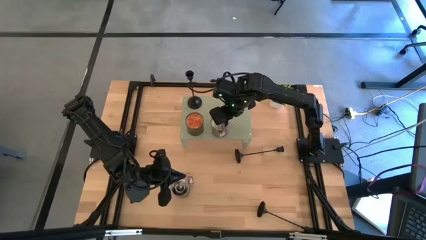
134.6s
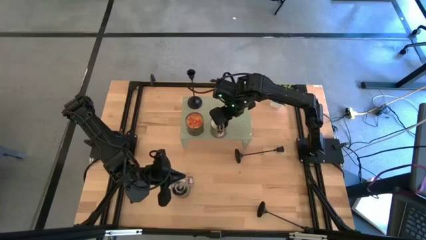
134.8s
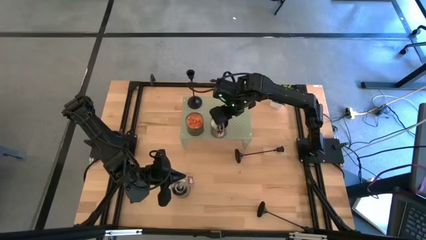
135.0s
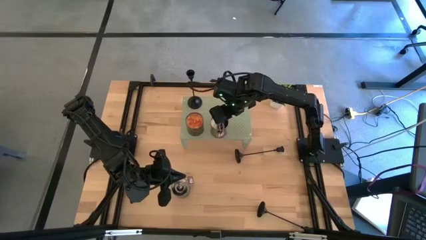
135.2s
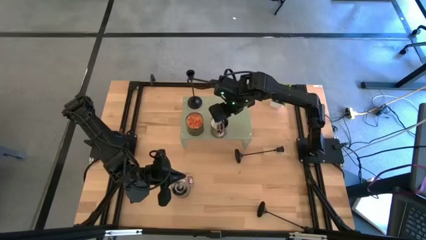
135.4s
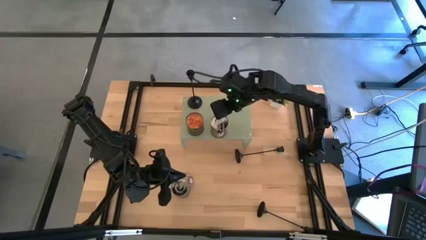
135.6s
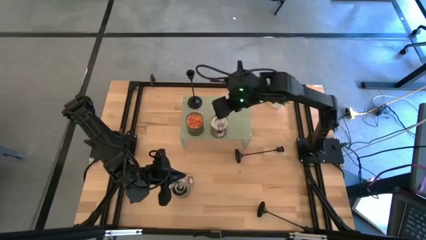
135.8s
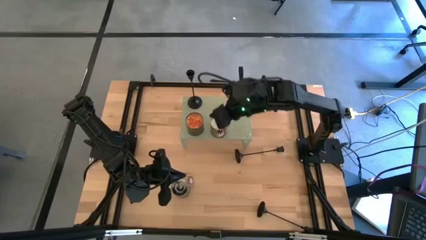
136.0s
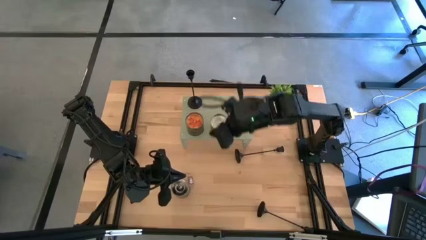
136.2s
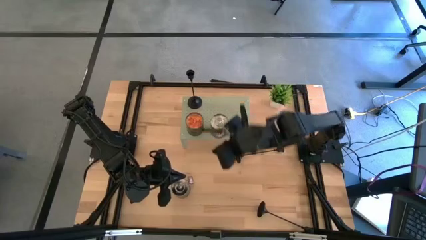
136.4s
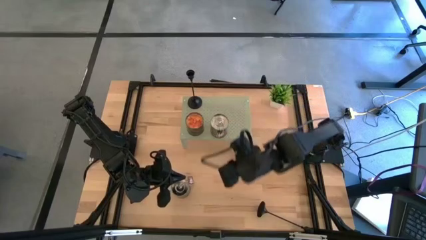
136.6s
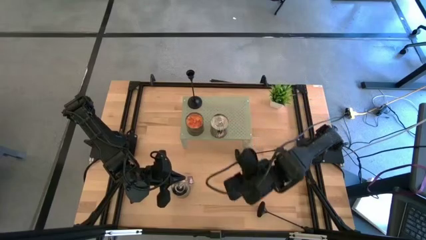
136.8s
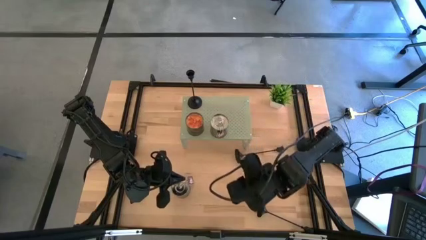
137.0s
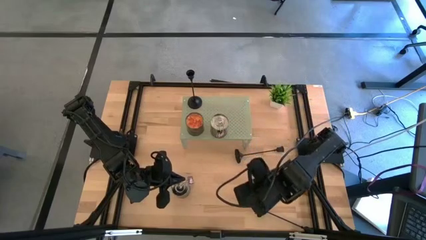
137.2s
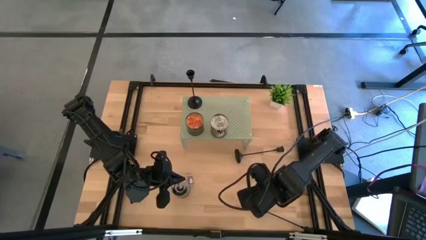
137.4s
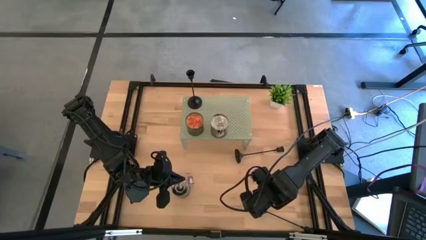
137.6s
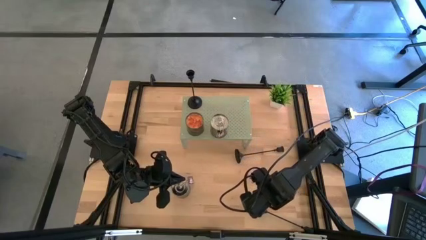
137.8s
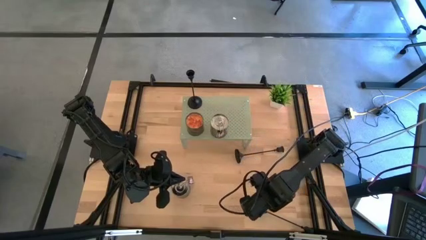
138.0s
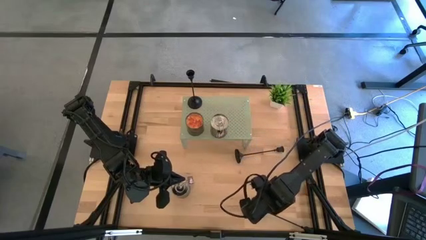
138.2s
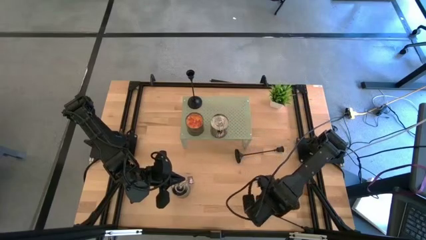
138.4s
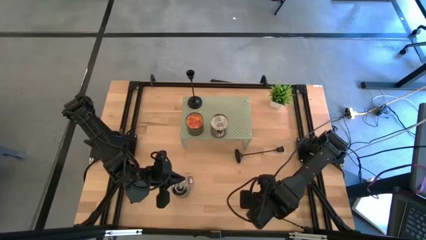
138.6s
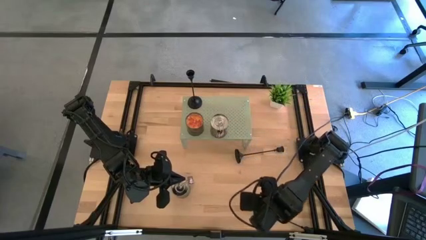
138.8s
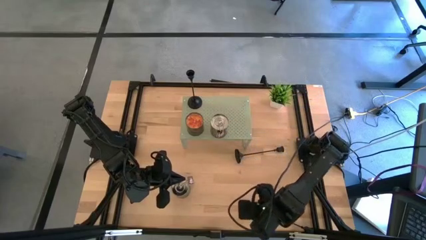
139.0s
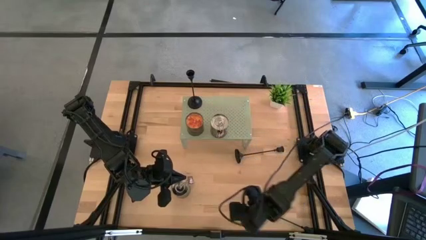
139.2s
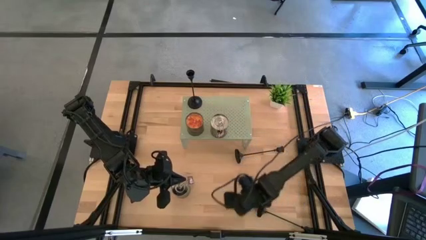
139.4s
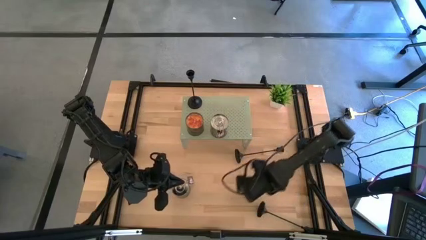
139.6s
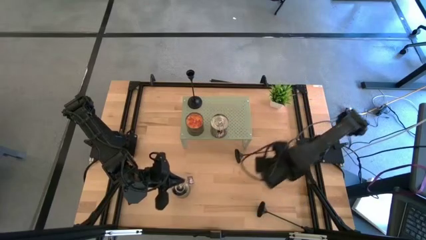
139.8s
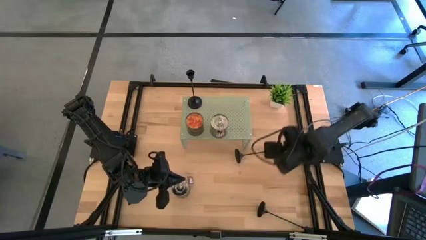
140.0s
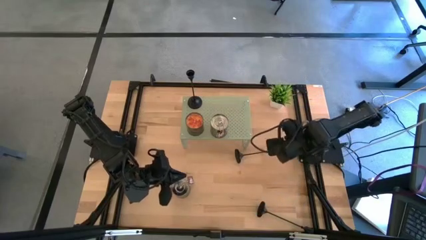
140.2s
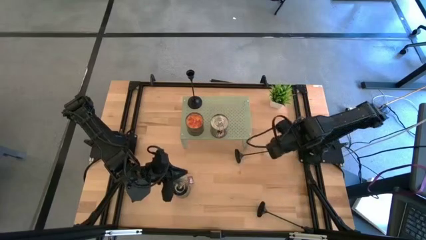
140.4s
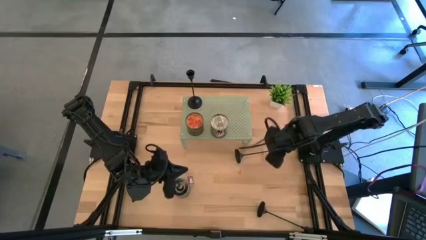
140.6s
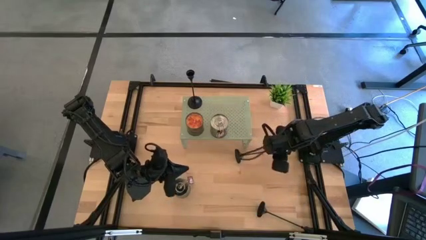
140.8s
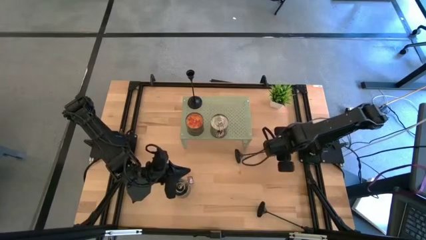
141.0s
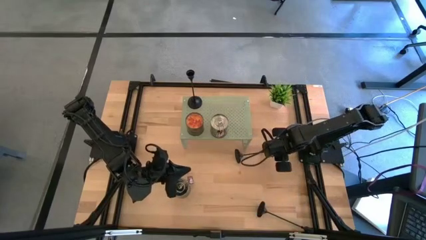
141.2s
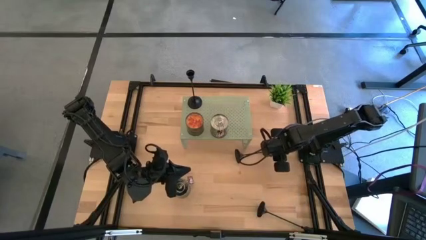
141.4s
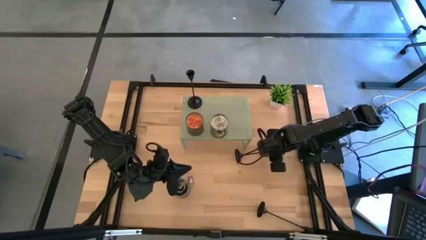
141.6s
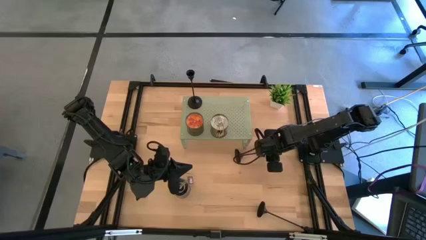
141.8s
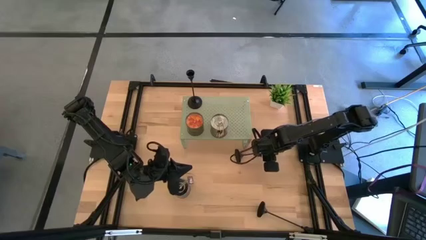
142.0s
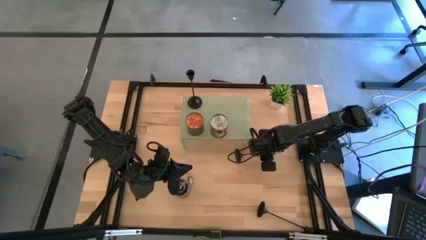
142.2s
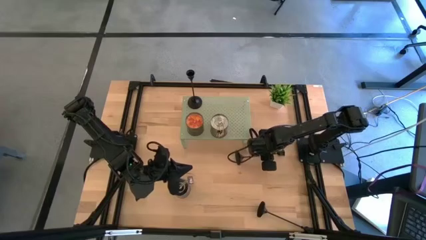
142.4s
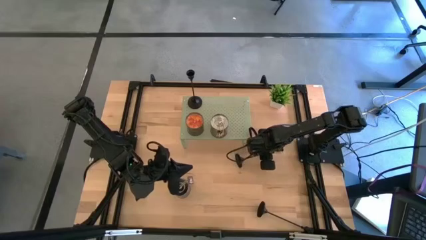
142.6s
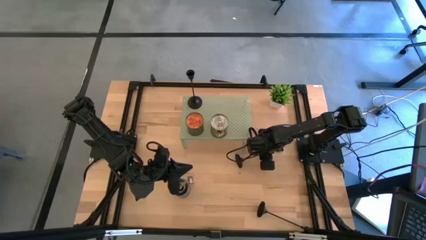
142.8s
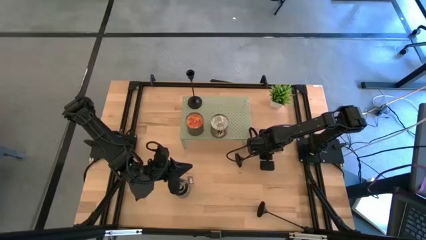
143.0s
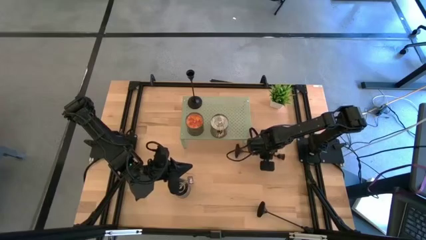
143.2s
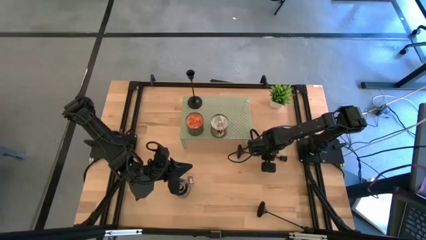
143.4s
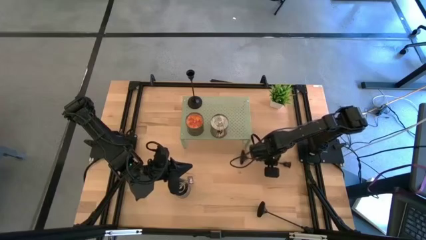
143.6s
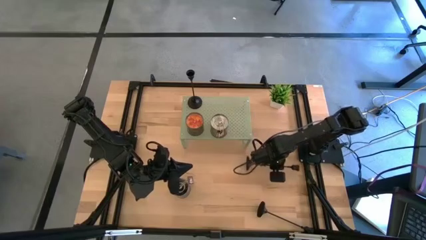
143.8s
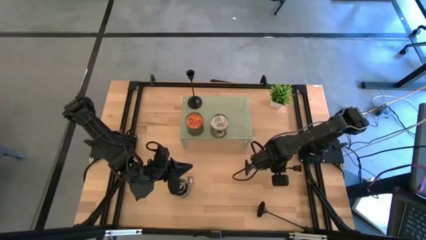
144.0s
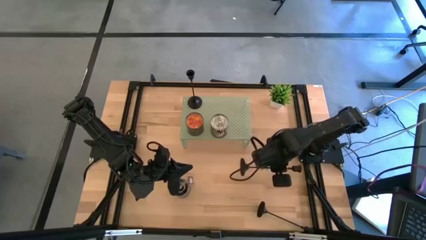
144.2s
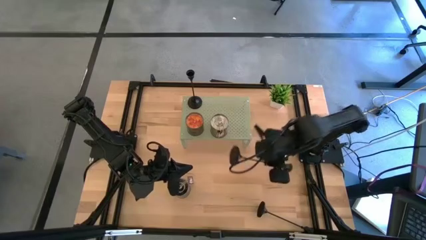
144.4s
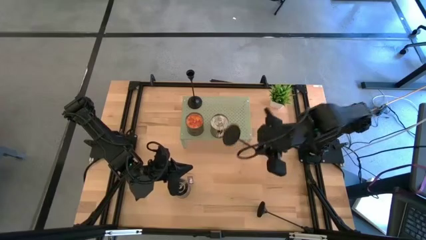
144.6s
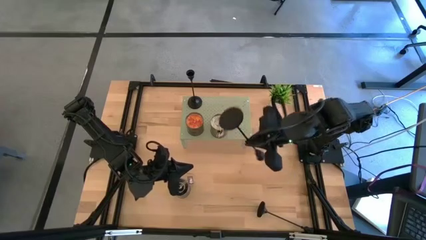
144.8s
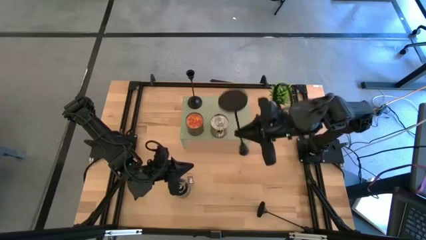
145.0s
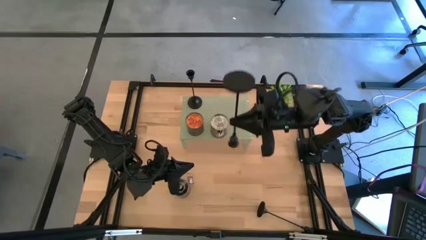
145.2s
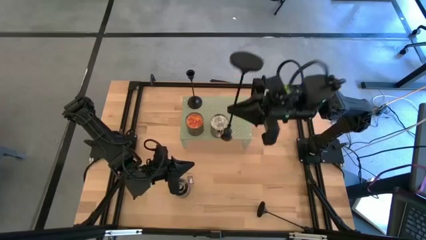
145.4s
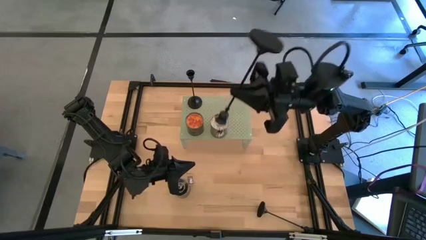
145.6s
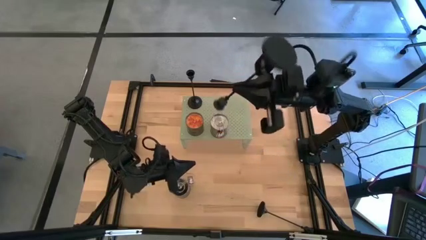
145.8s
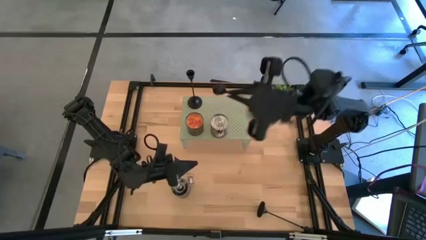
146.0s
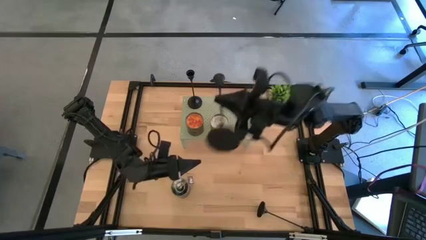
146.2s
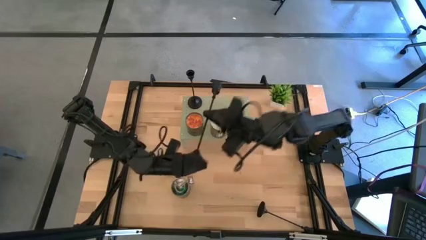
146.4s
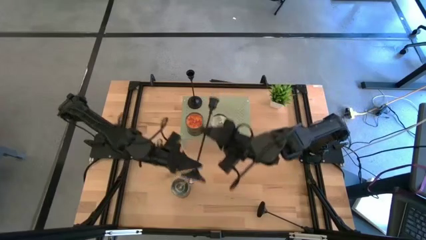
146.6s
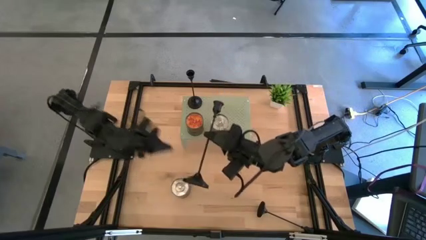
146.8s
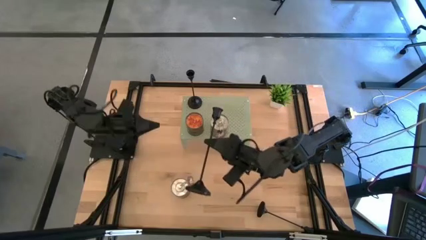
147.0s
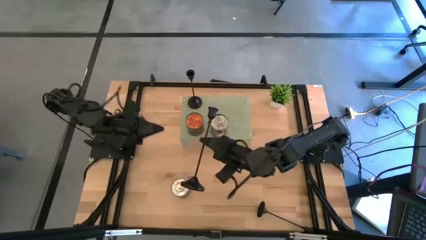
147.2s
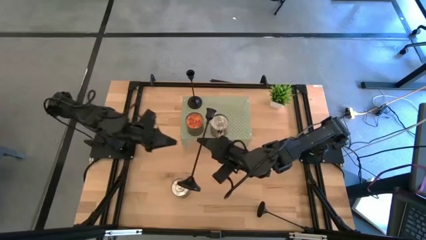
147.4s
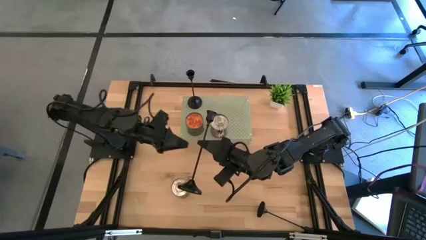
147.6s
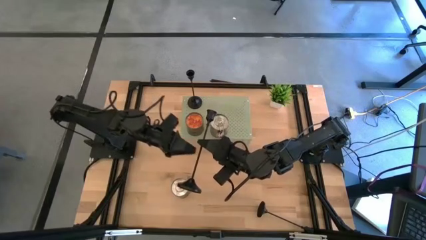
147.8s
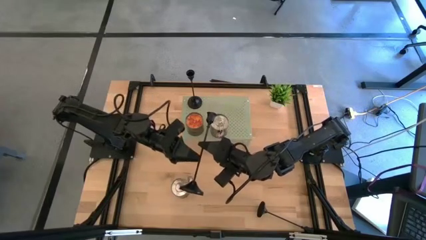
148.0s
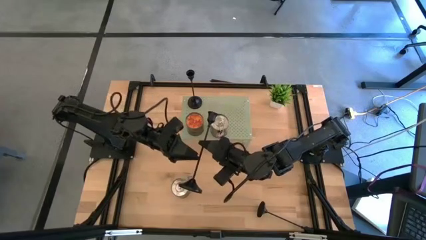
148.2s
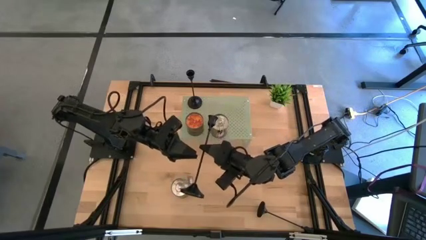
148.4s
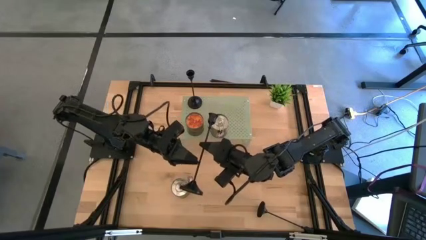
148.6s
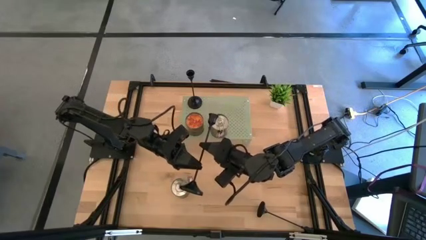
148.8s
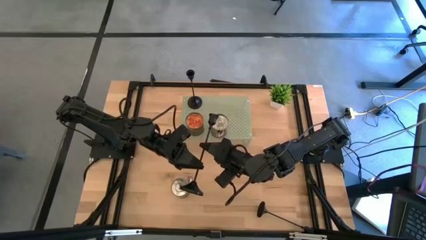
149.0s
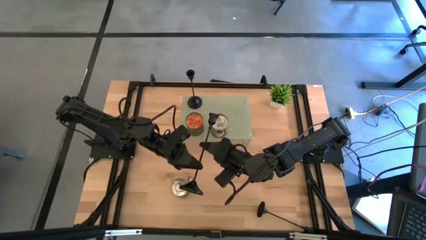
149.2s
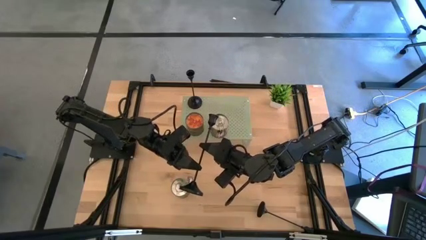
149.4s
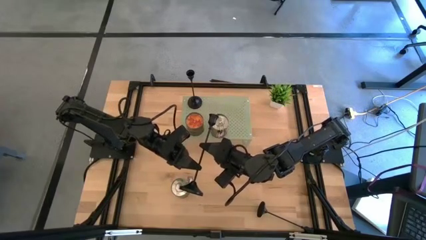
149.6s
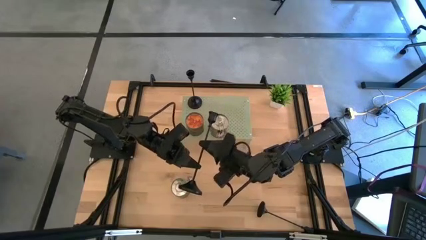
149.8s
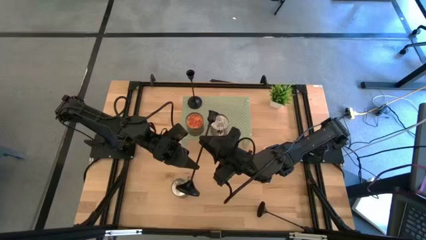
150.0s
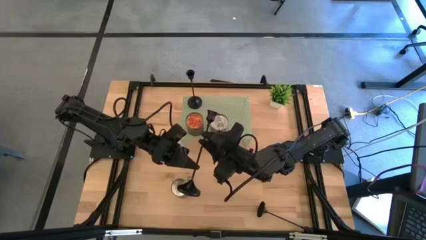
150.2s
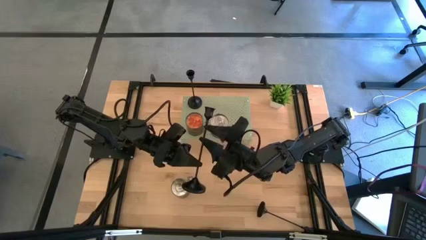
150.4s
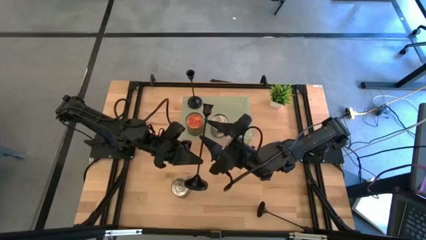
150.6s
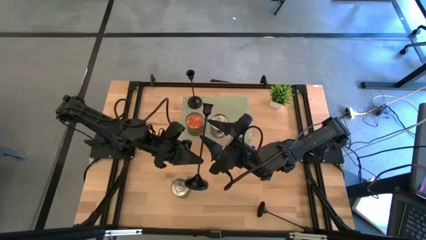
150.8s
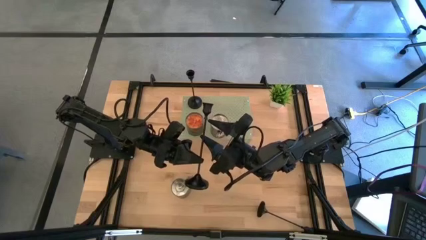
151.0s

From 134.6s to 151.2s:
Task: Pick & Place candle stick holders
Put the top candle holder on the shelf aligned with the other candle holder
